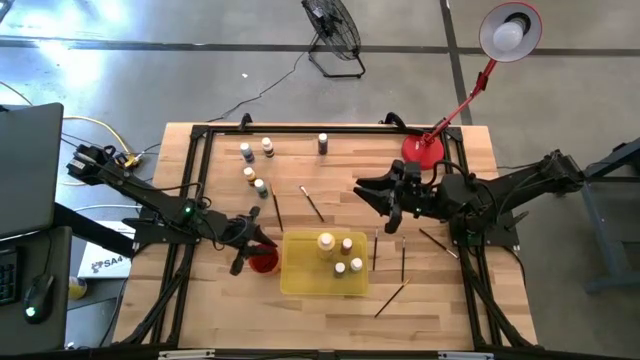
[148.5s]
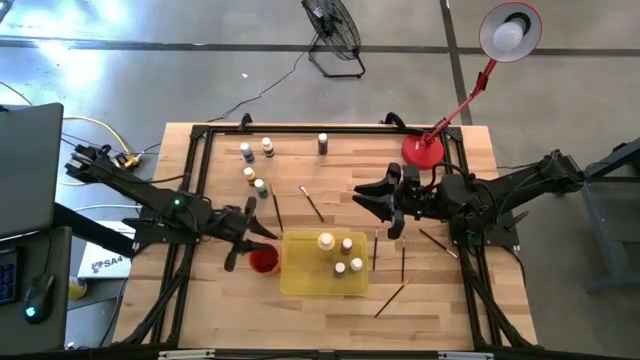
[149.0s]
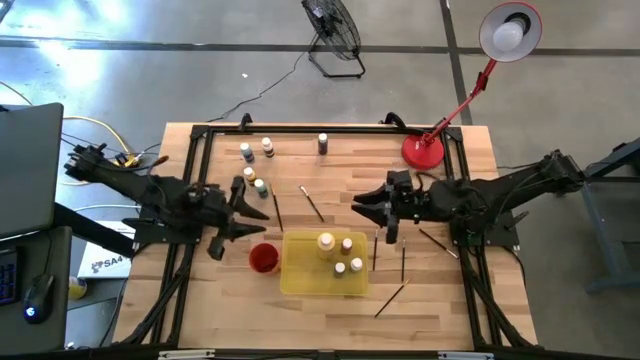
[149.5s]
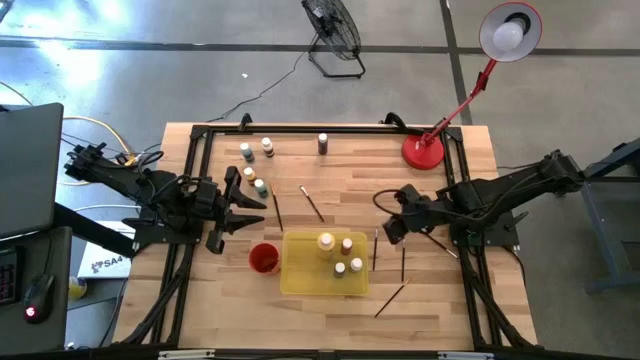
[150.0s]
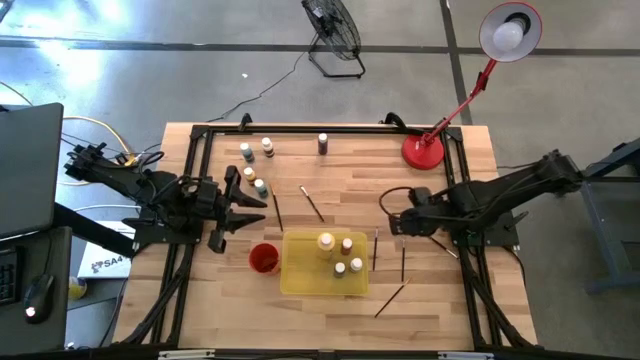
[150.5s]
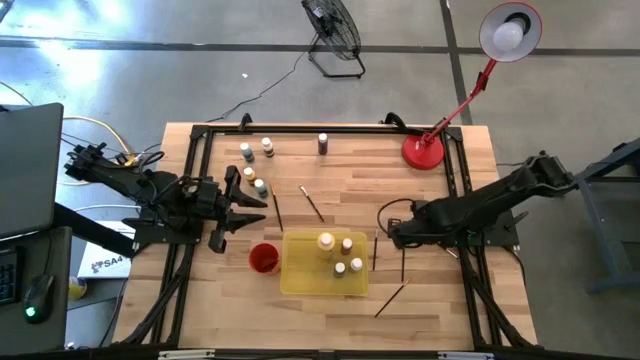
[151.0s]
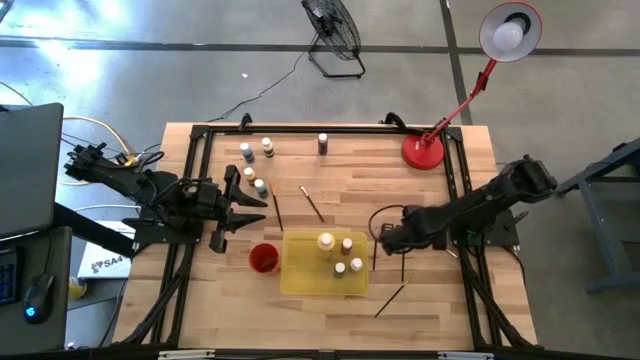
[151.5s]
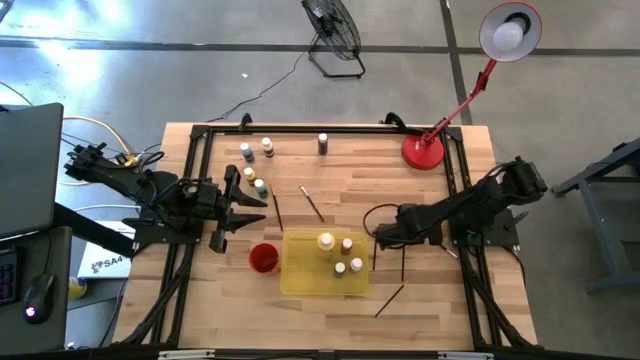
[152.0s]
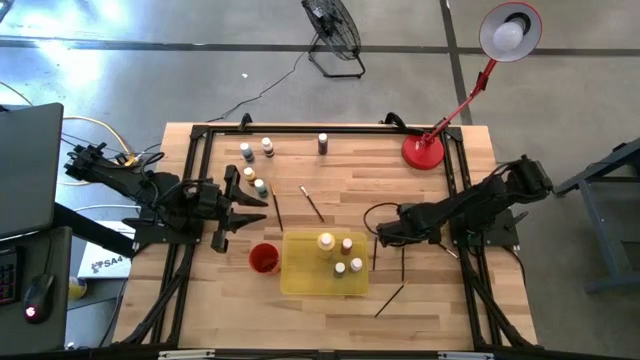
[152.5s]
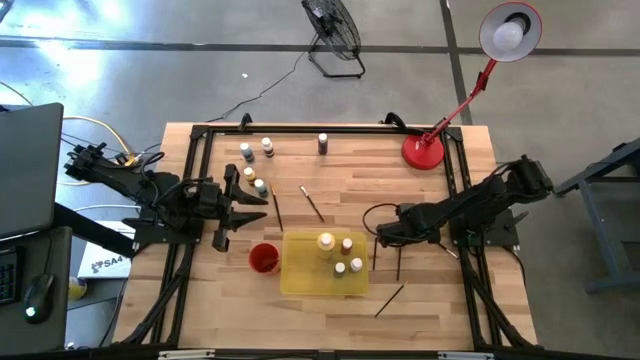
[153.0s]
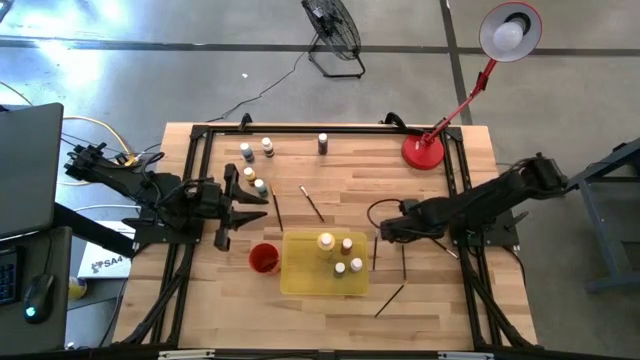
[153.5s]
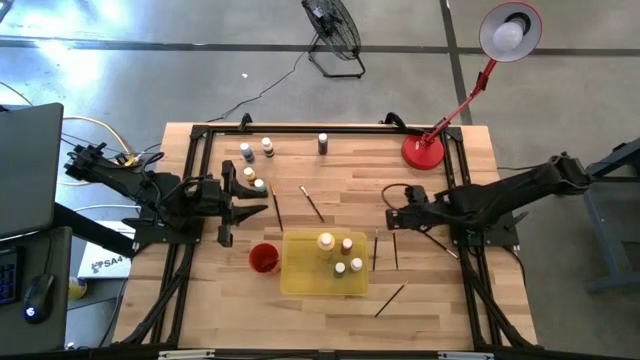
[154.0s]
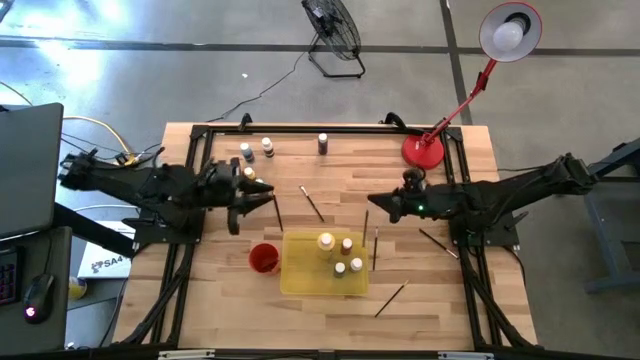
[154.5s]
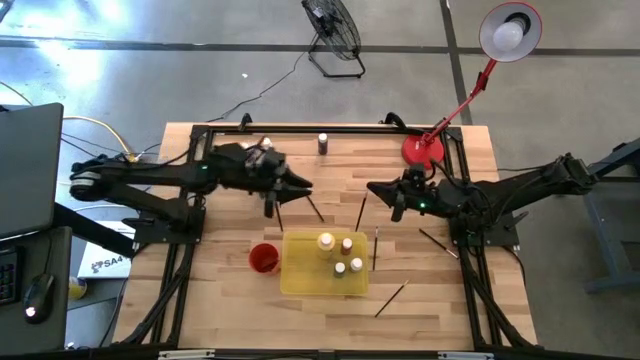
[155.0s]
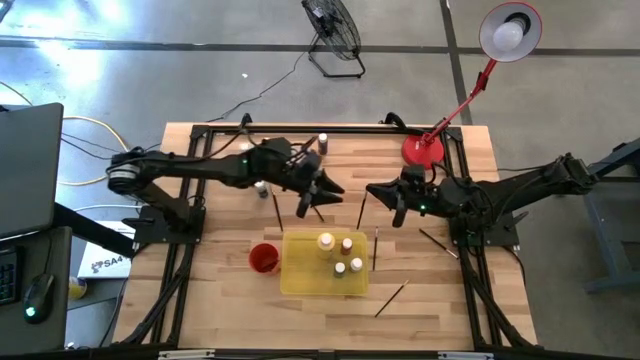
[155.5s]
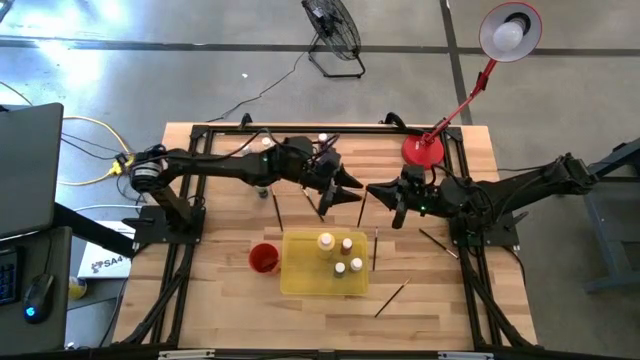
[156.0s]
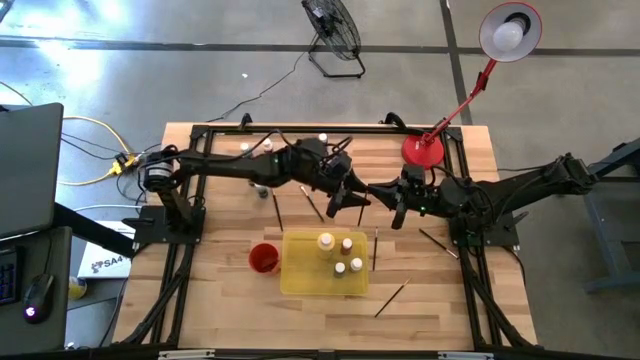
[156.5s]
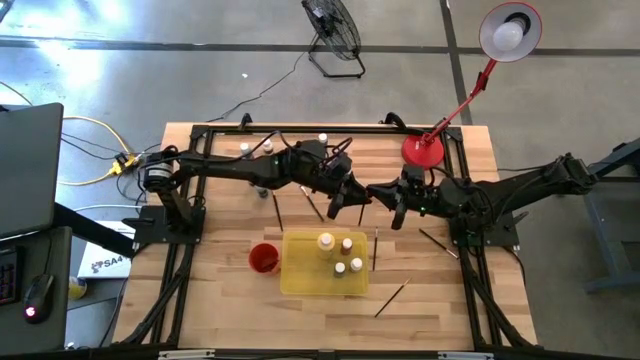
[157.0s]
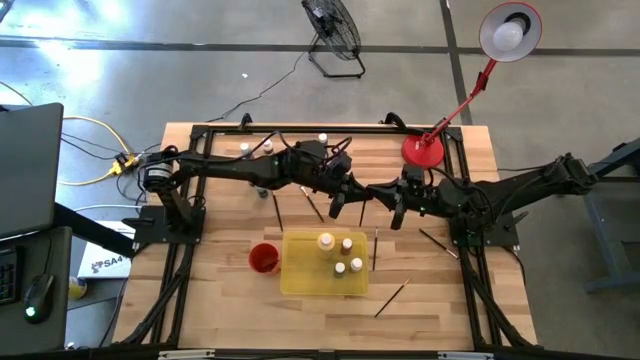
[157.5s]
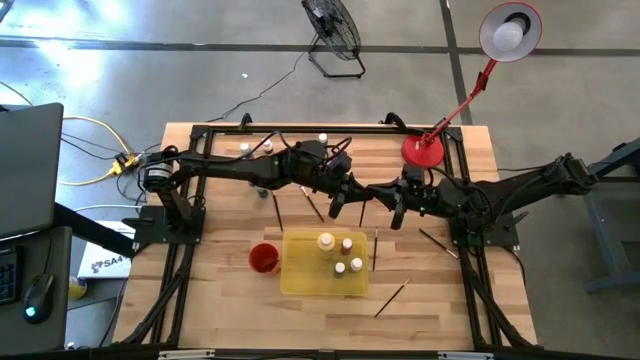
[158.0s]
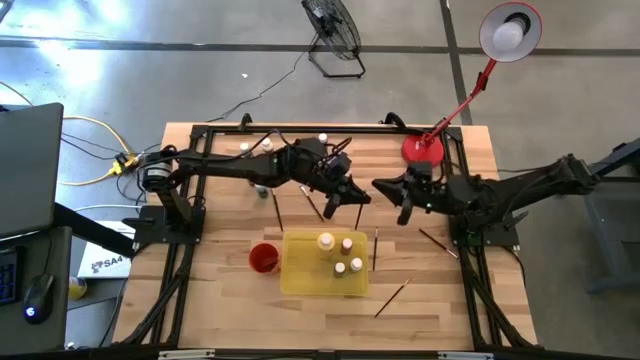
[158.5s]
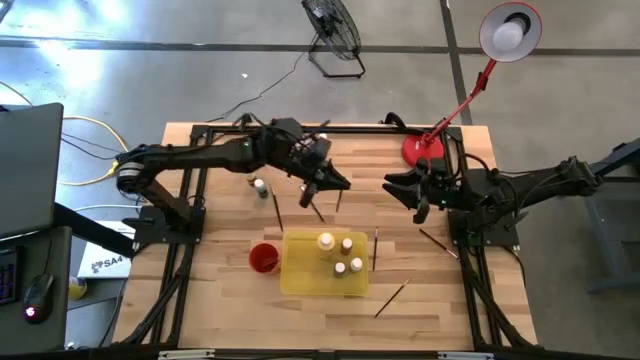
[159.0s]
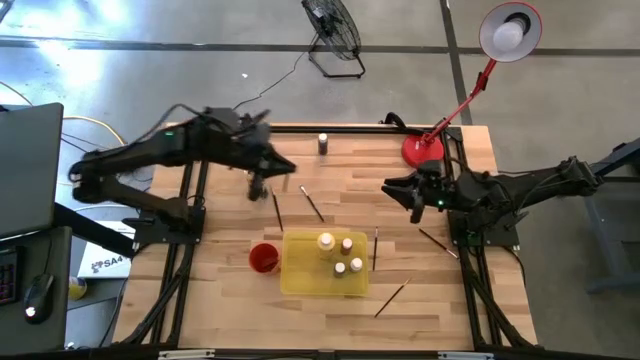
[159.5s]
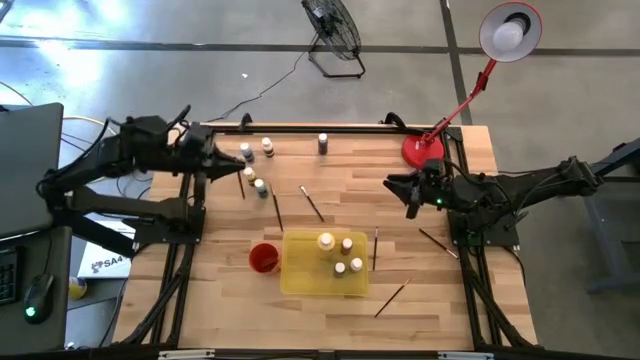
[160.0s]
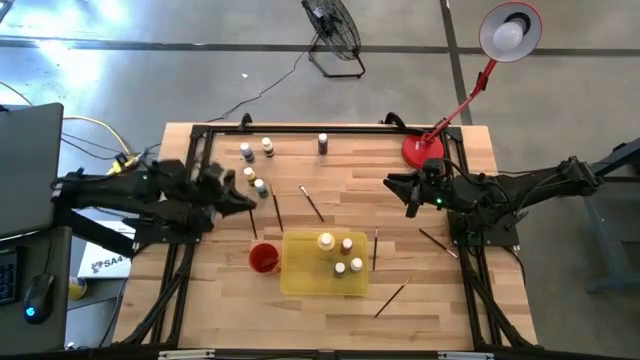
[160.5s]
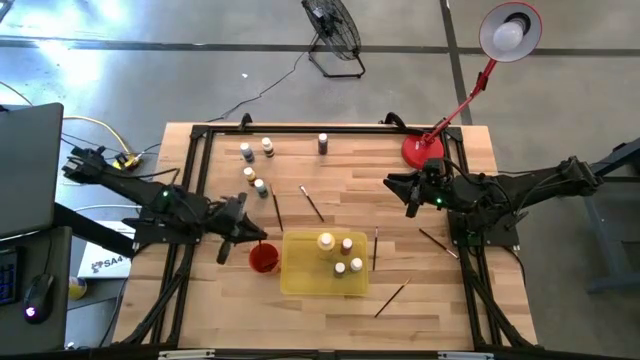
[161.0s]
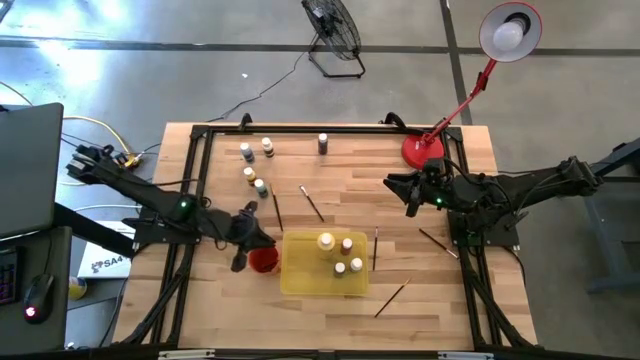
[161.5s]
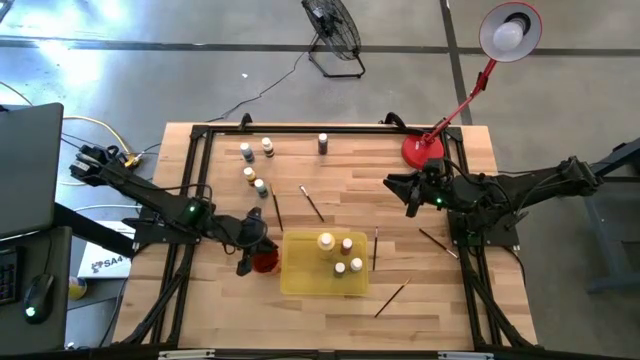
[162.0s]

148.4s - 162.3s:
Task: Pick & Place Paint Supplies
Put the silver paintbrush into the orange cup

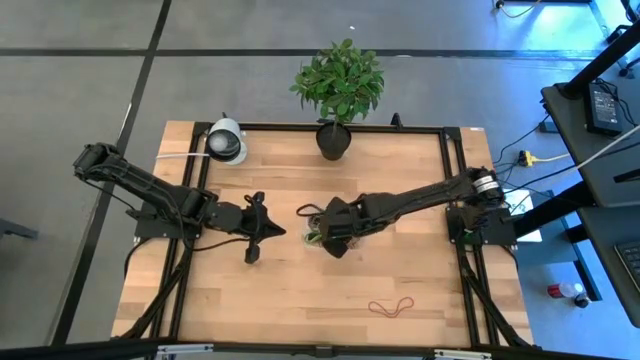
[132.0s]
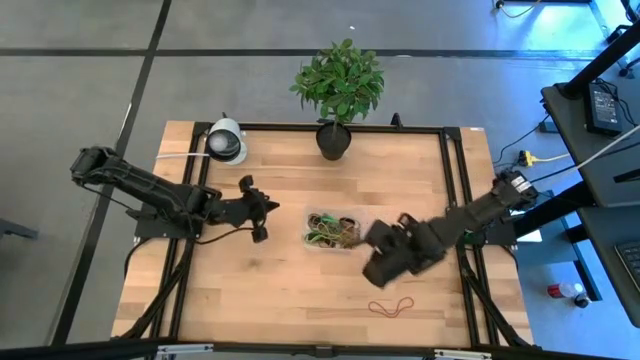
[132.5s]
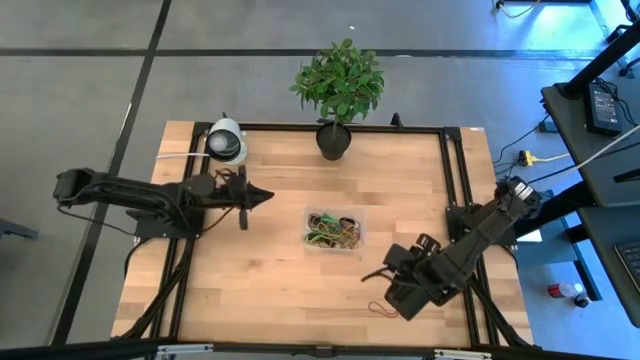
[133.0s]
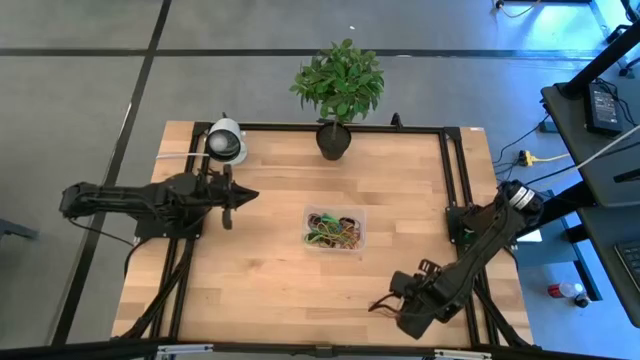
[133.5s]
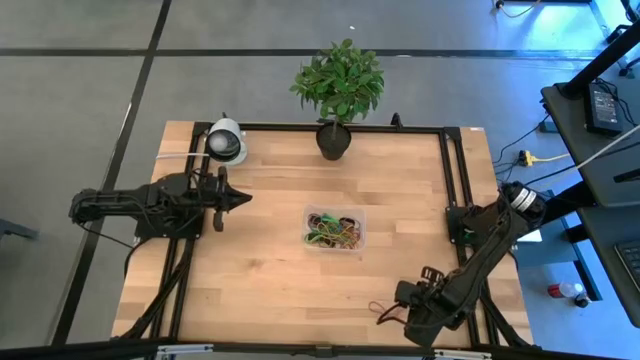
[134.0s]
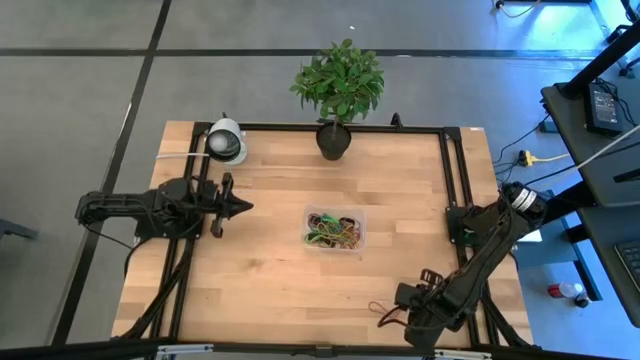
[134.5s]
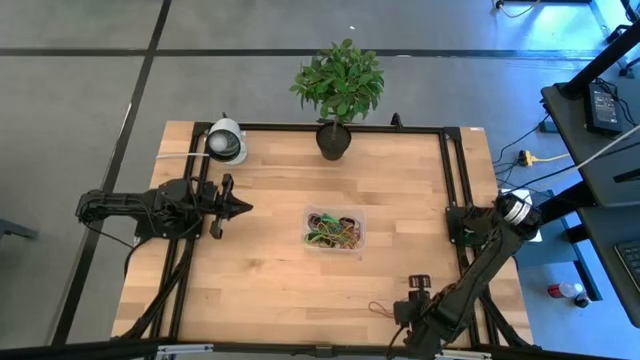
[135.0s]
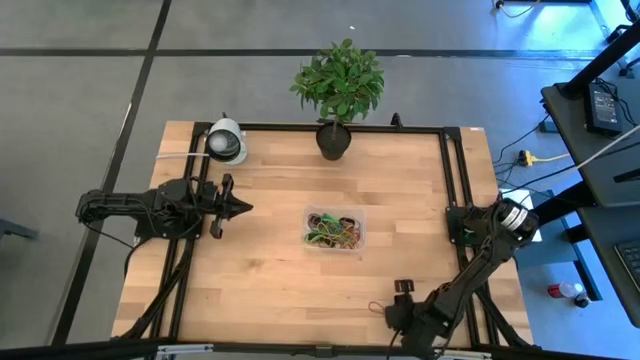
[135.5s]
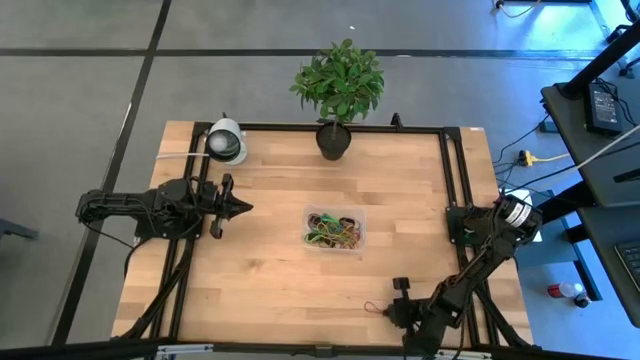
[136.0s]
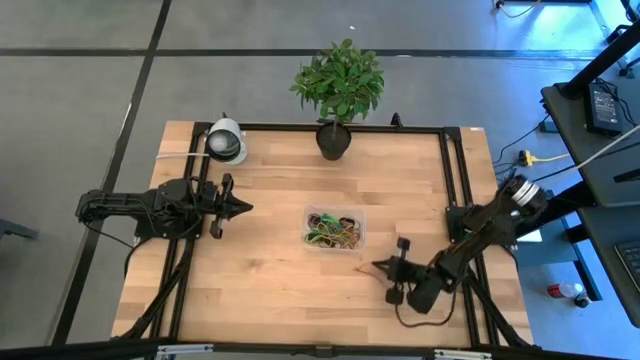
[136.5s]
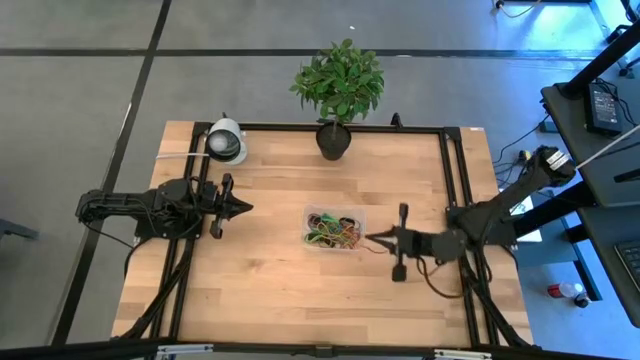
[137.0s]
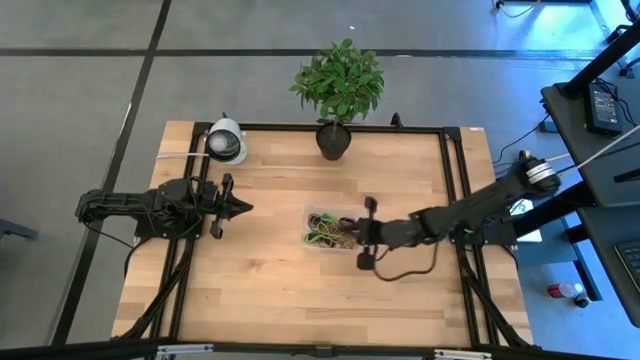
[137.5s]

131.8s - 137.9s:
Task: Pick and place rubber bands into bin
Put the red rubber band into the bin
